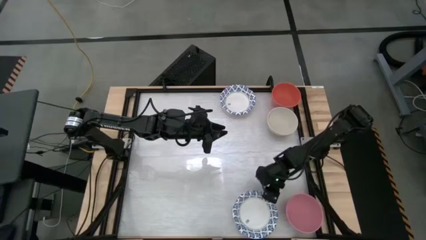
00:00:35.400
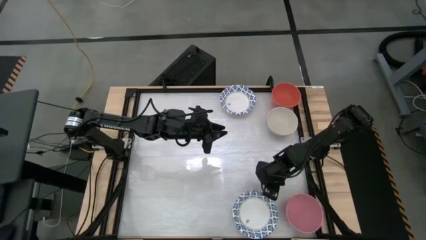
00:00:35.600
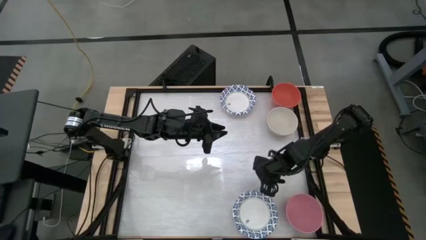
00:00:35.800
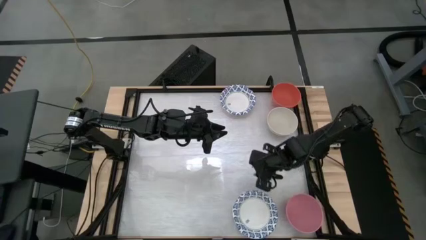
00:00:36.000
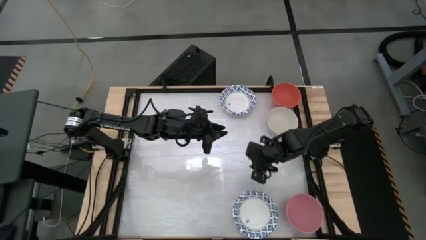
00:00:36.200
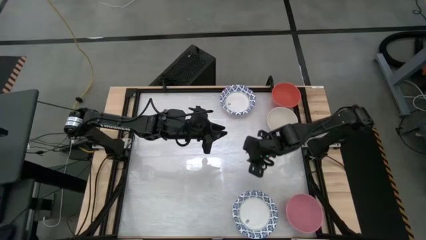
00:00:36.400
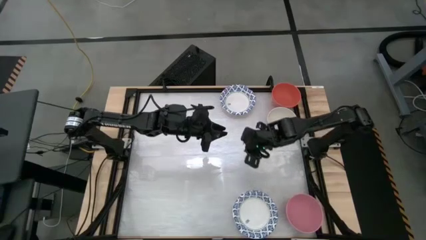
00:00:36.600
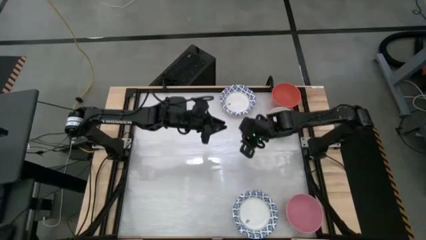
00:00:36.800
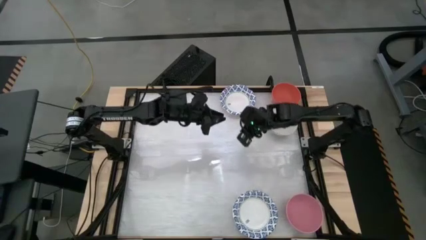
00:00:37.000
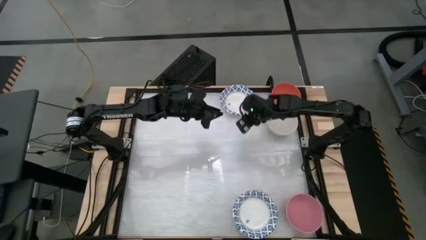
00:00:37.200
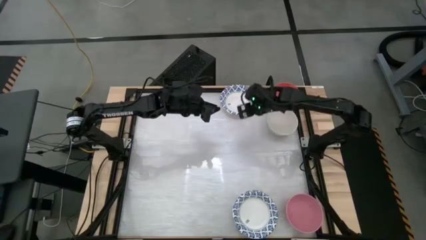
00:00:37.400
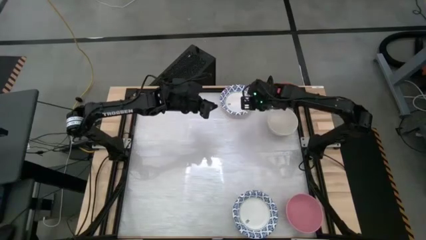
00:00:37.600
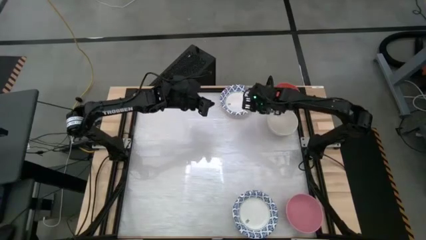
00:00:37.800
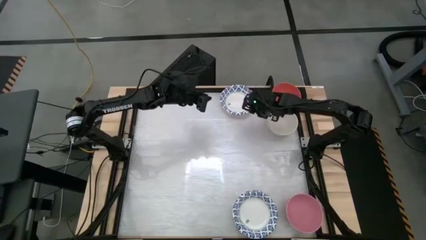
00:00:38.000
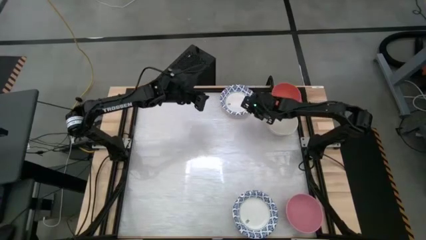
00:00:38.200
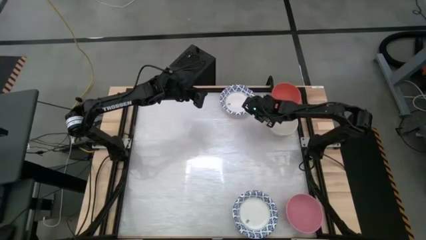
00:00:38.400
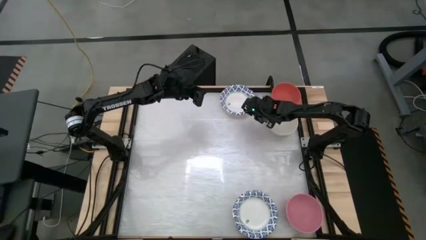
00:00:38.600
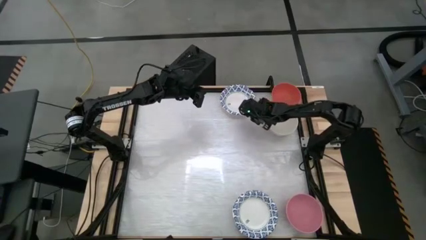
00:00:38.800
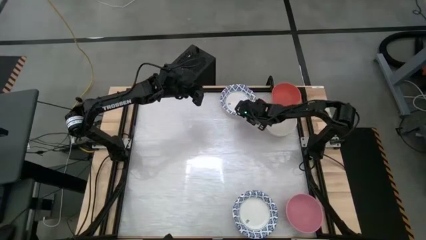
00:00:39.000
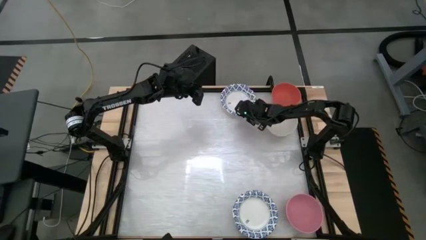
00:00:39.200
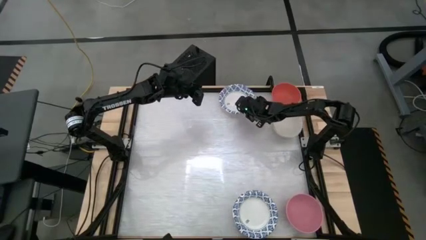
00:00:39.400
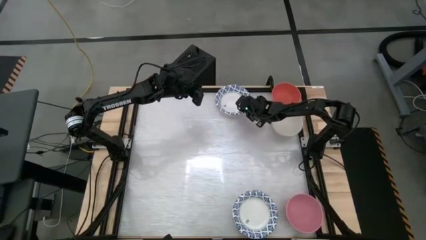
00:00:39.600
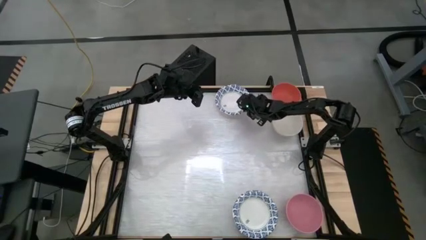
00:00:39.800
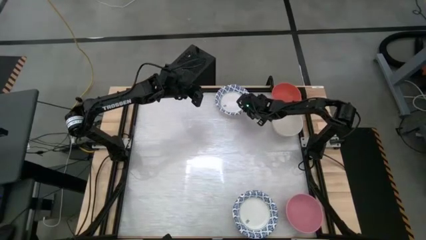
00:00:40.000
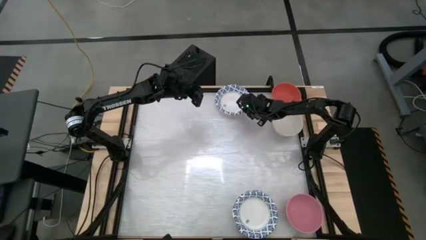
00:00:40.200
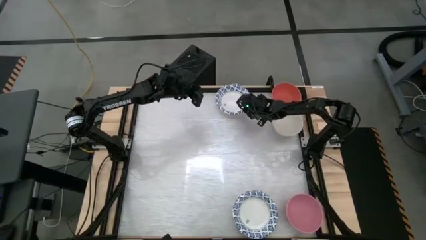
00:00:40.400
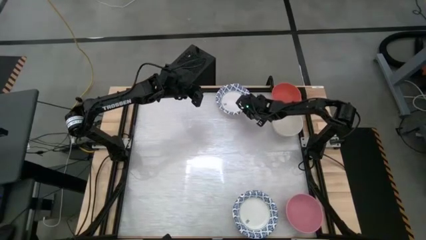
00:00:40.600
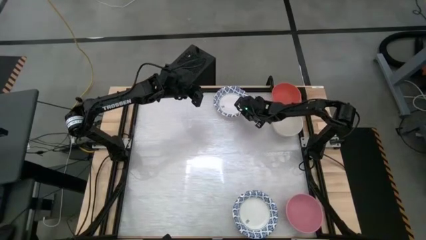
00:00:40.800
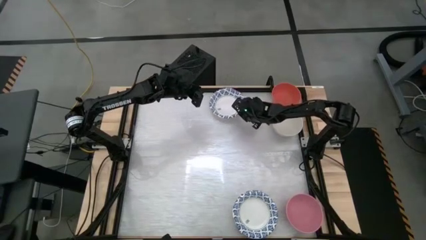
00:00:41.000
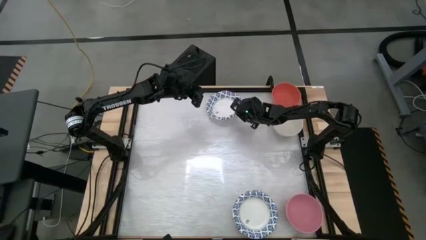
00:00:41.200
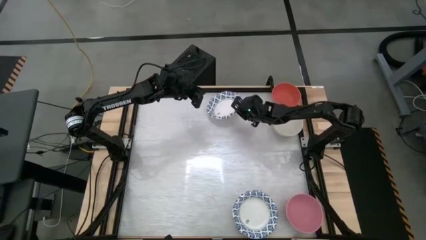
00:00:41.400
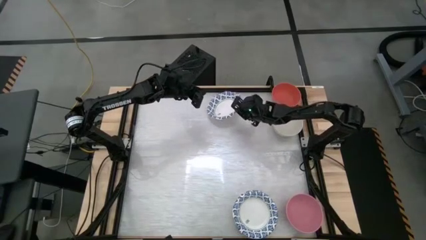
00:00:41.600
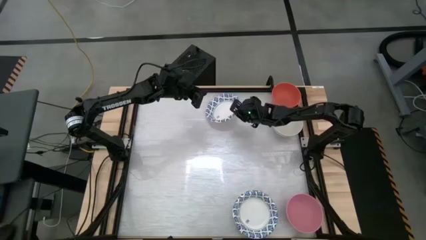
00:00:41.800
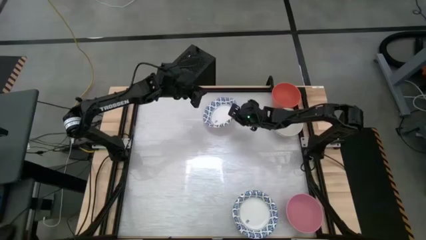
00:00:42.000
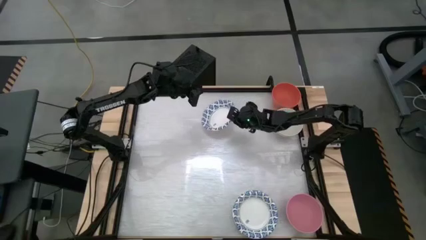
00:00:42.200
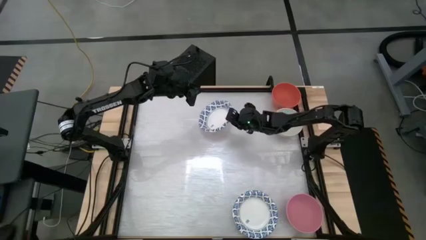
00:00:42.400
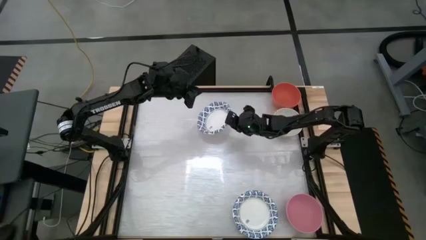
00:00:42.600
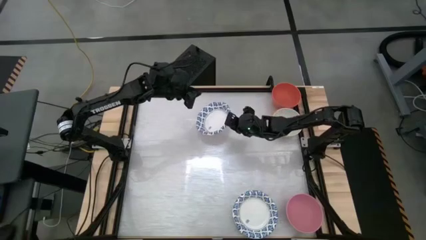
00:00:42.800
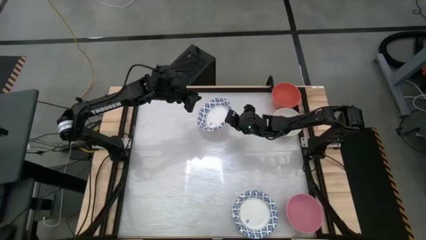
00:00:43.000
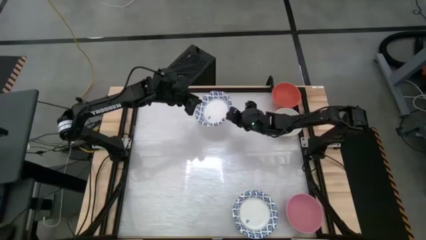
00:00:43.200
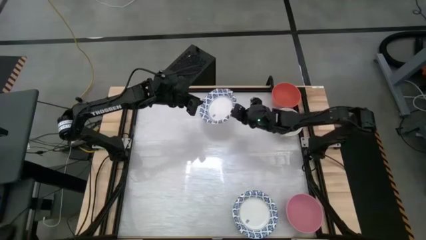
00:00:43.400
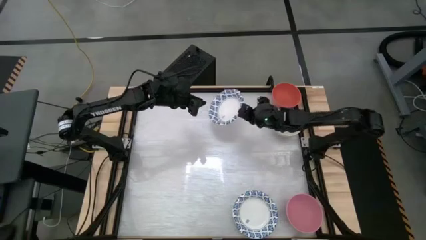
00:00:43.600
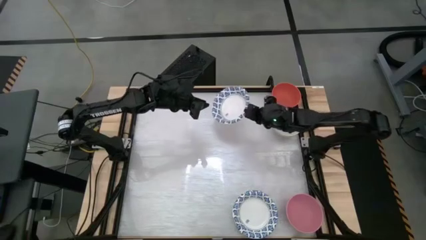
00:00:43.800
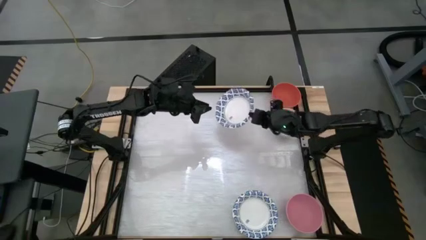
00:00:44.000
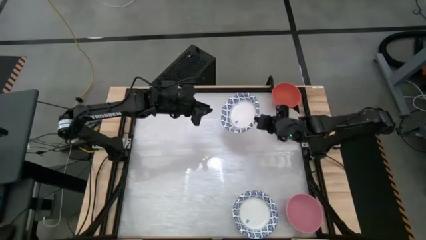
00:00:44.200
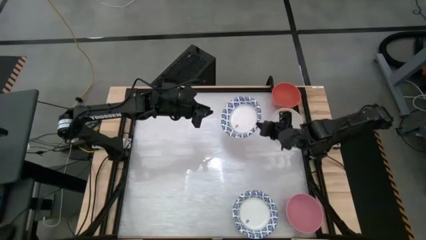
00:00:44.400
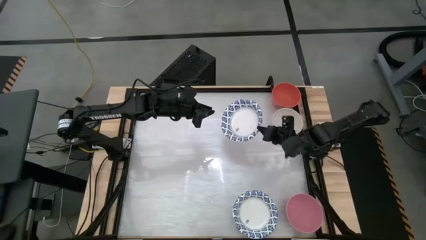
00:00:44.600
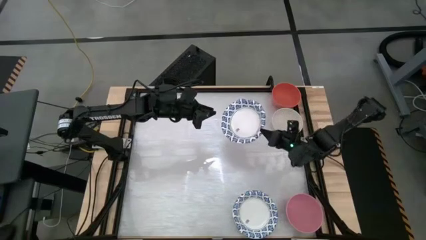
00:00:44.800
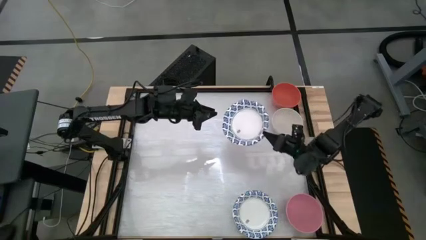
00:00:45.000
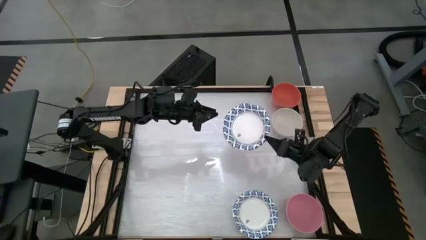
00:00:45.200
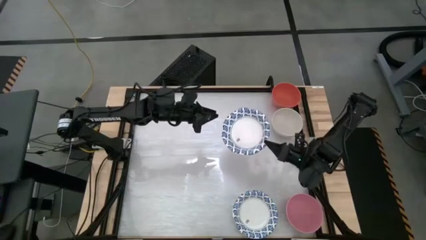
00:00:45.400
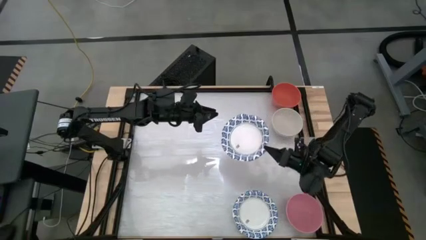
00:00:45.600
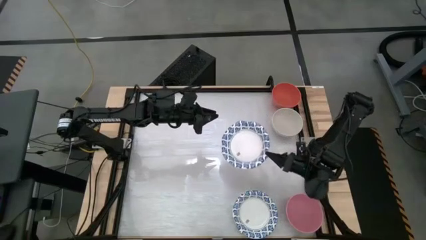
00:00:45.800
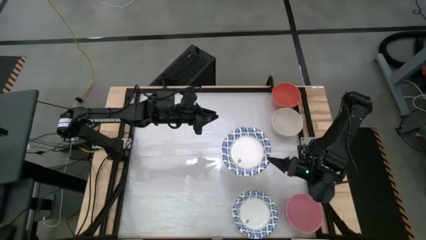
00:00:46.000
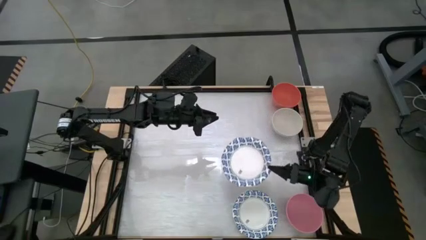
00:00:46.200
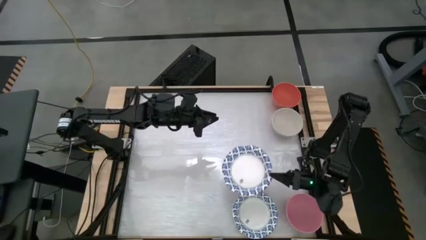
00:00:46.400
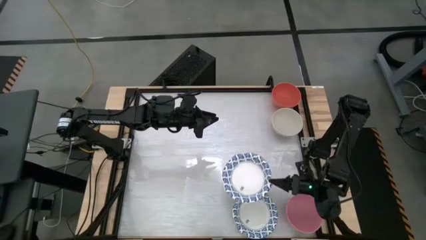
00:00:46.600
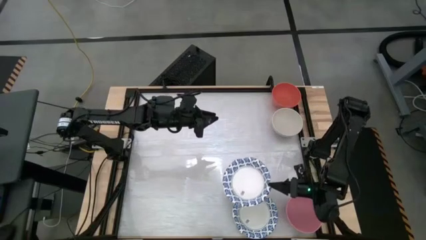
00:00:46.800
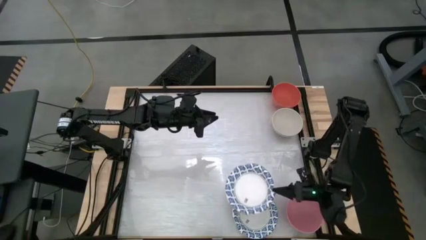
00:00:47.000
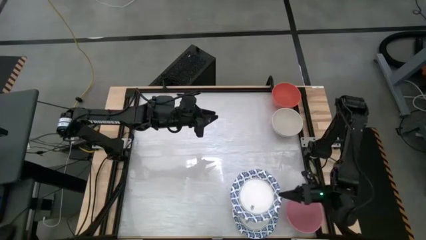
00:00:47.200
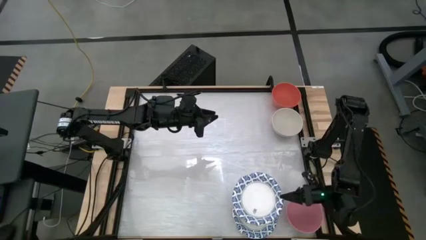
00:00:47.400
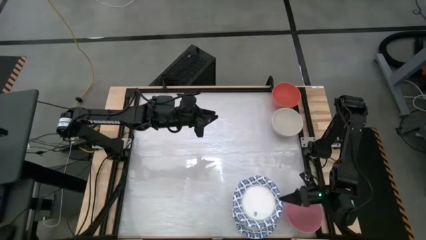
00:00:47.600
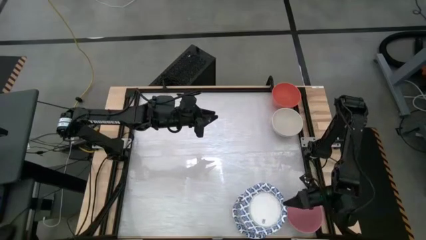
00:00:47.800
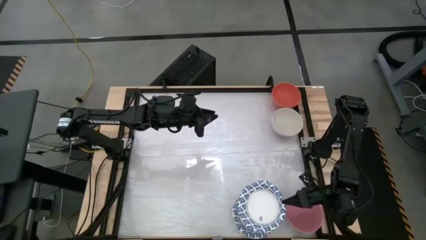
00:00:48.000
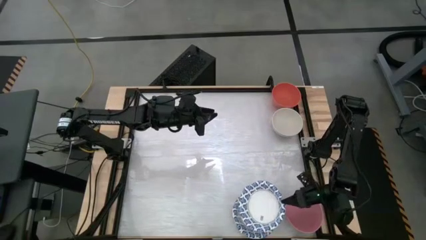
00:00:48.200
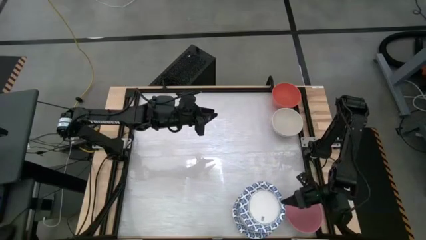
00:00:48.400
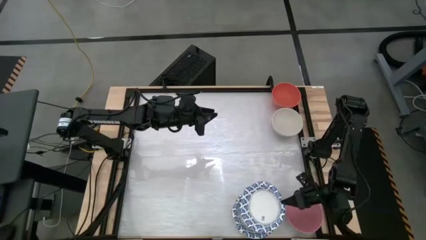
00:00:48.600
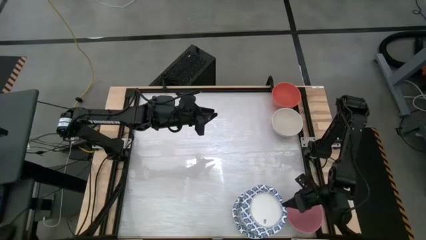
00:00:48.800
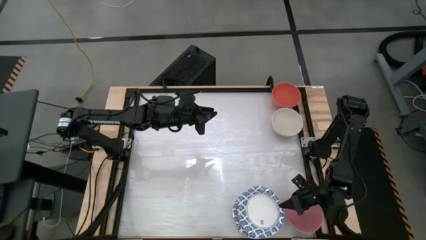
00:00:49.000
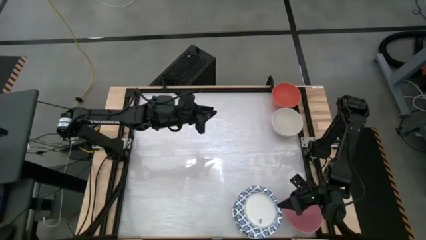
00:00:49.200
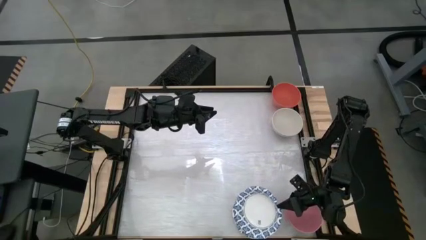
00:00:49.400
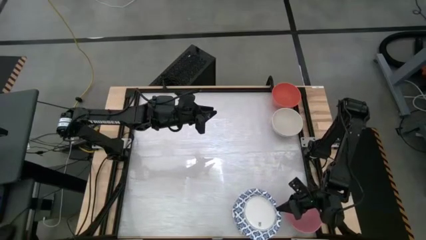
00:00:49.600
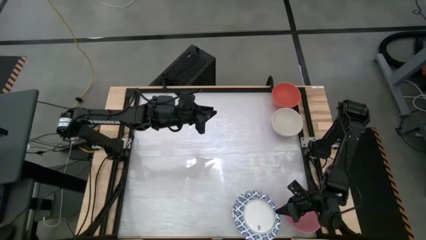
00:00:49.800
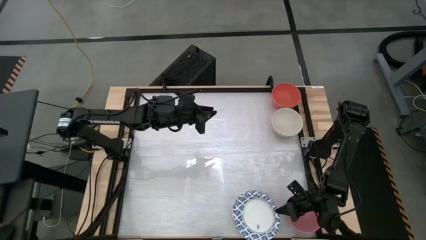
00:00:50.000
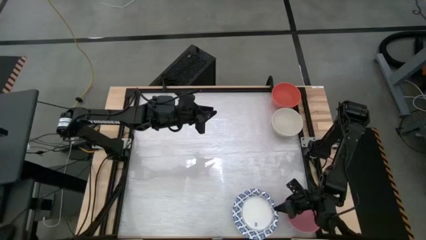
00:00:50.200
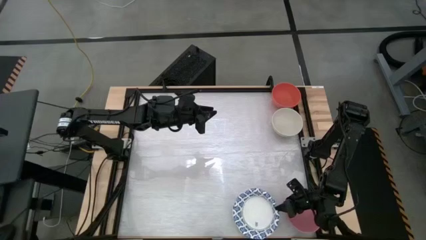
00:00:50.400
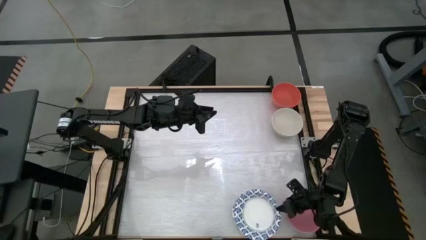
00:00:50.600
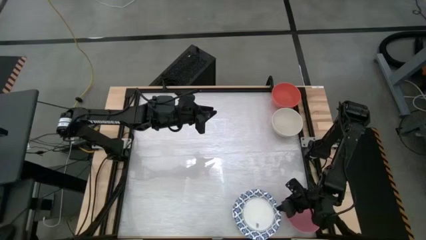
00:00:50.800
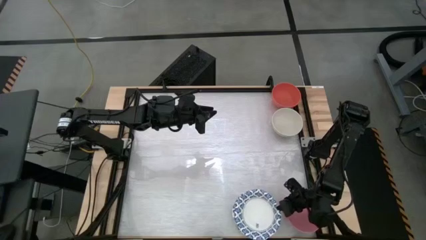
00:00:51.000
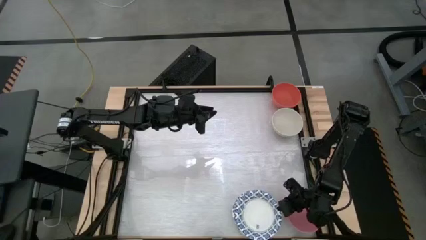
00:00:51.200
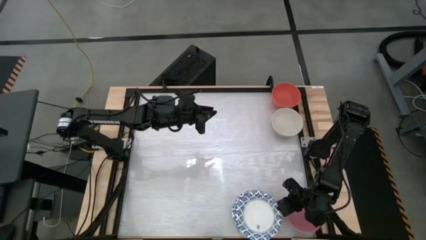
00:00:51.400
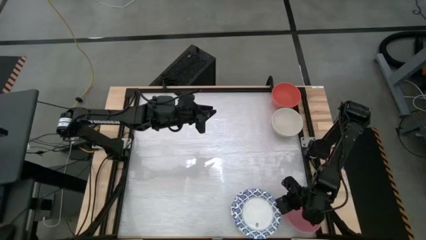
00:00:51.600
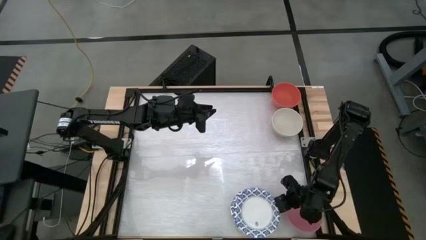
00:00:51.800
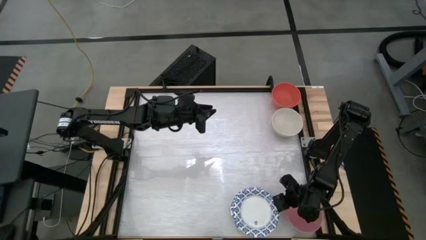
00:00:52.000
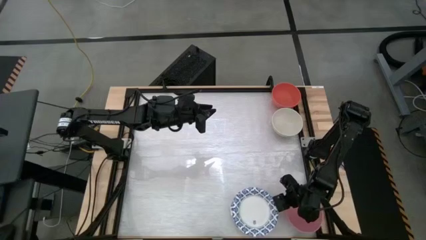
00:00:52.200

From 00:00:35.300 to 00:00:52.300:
Stack the top white blue patterned bowl on top of the white blue patterned bowls
